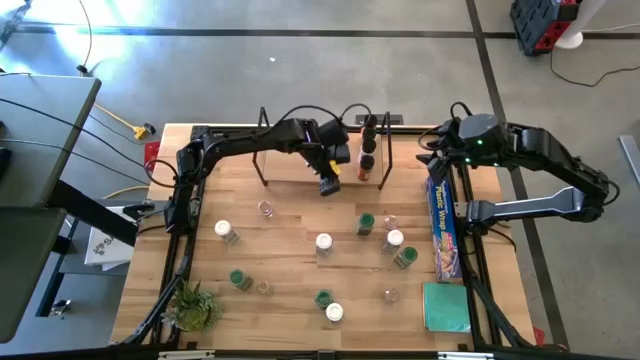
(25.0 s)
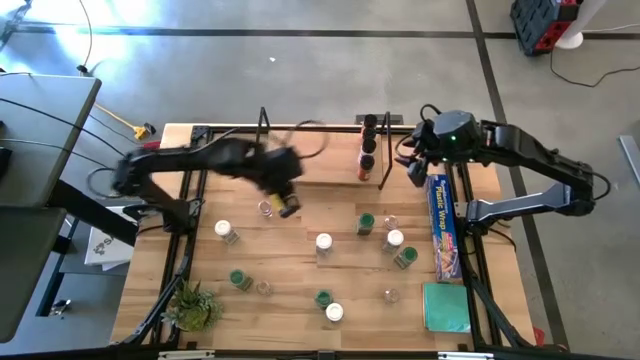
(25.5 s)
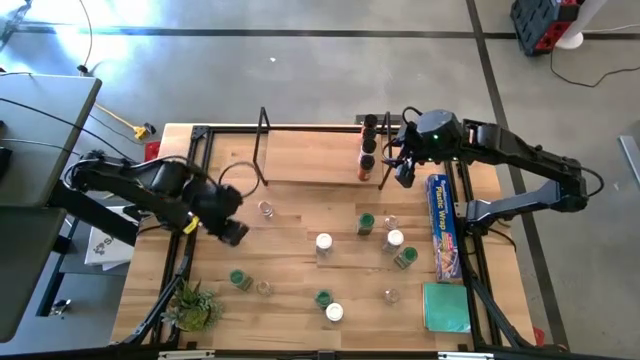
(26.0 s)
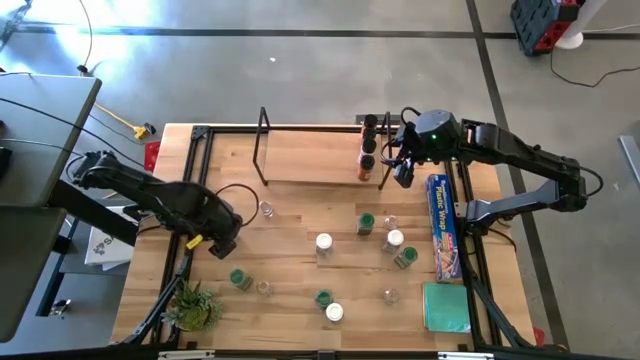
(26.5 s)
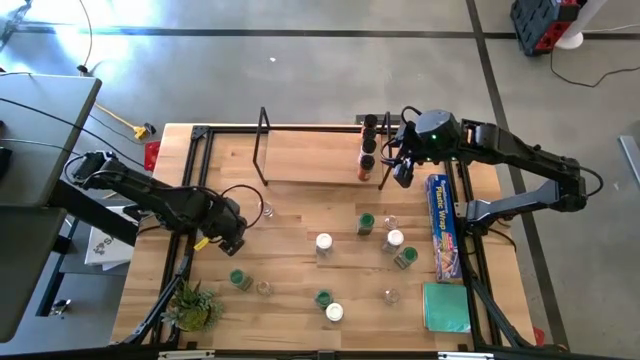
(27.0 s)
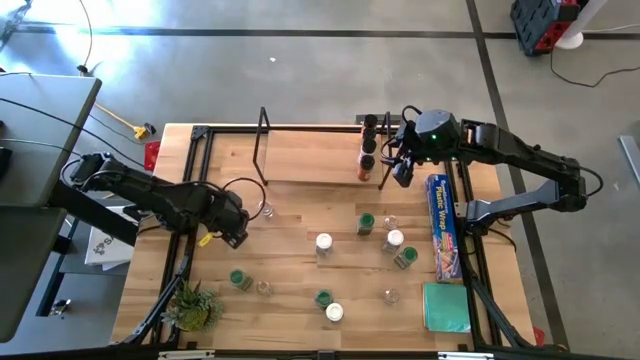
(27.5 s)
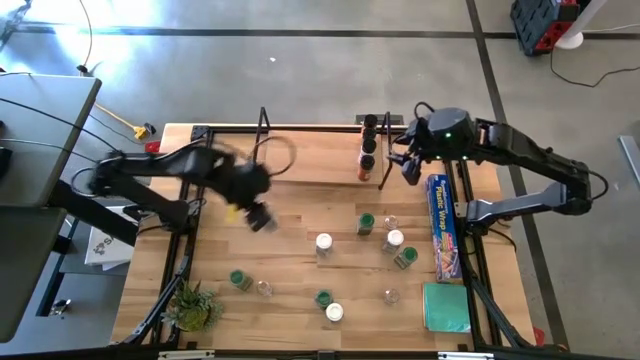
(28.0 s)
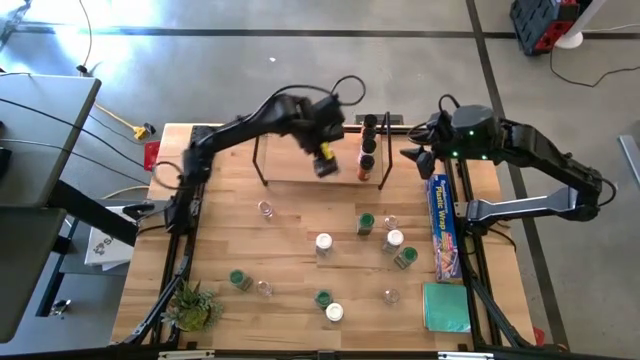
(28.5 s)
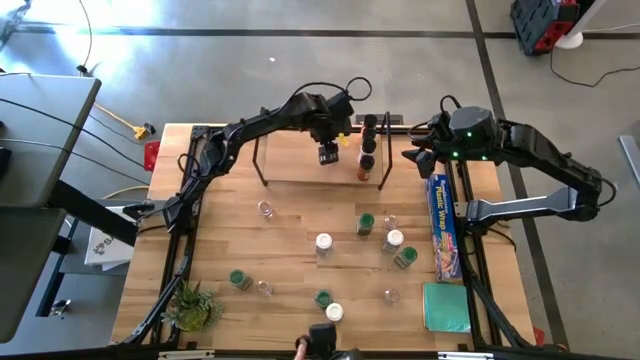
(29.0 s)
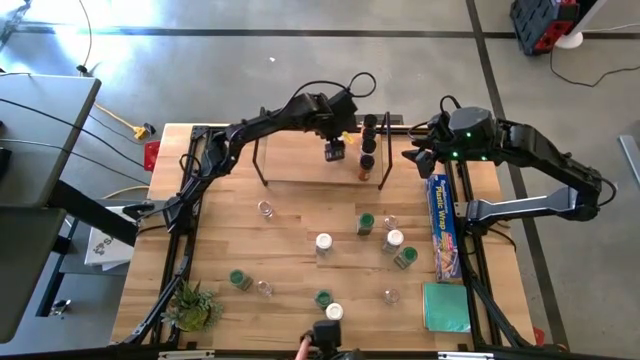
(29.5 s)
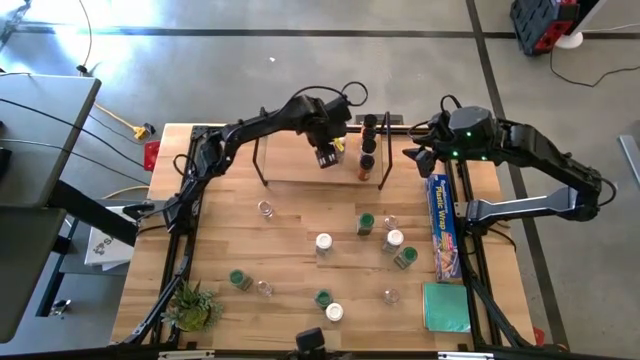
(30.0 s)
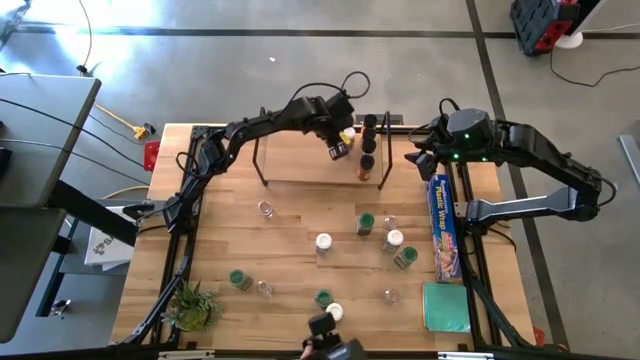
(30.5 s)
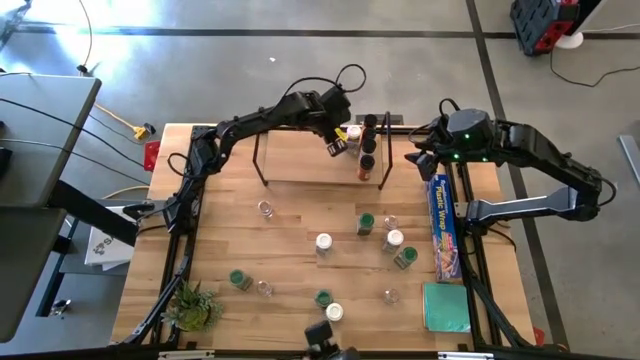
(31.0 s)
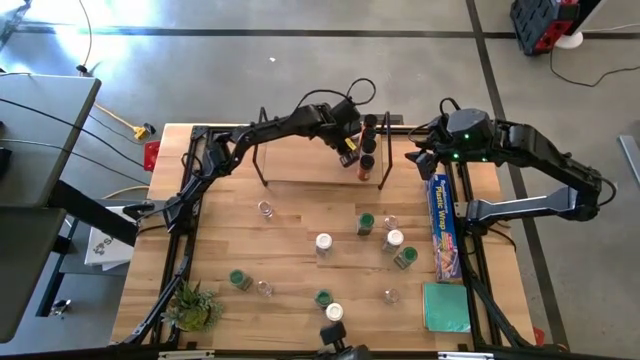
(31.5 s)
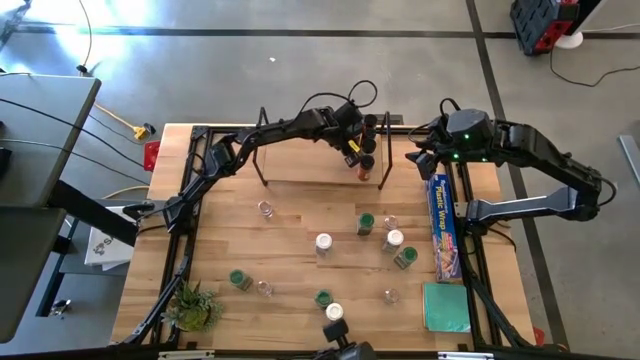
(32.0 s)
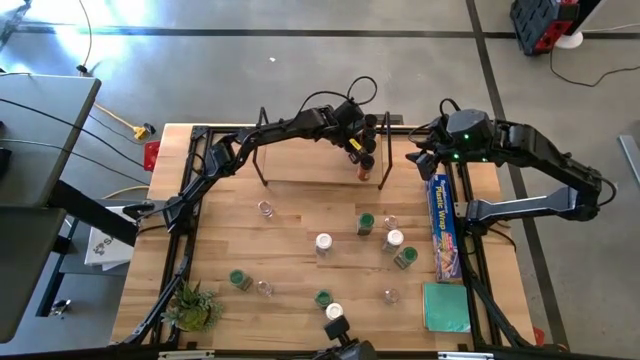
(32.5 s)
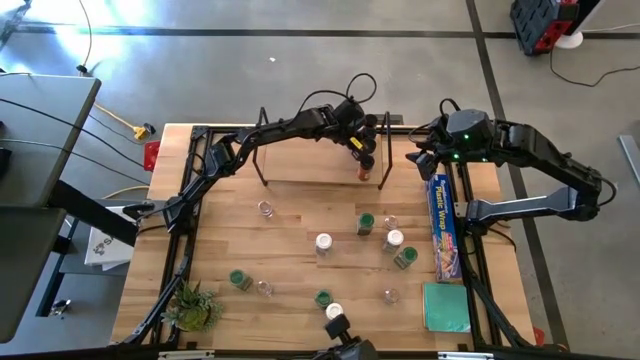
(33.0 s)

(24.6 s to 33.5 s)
Task: Shelf spices
Put the white seasoning bottle on the shelf

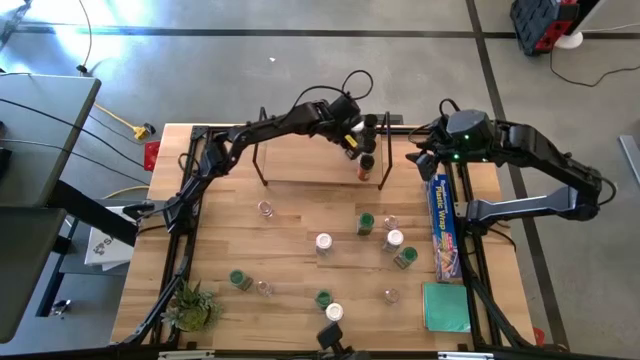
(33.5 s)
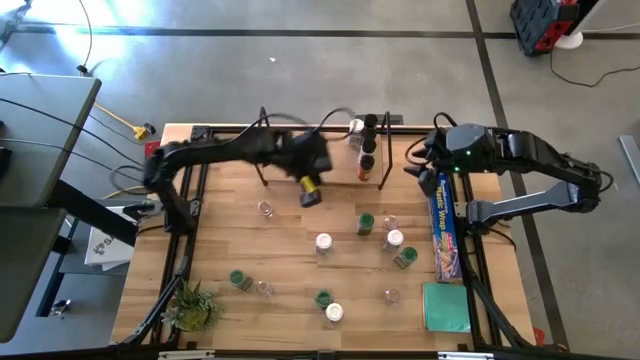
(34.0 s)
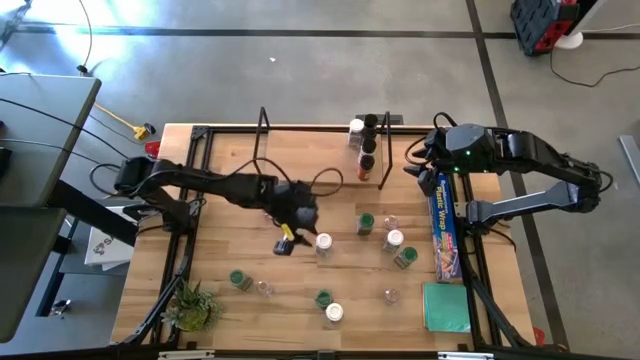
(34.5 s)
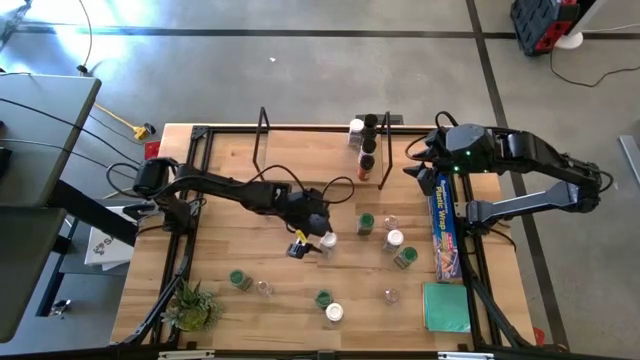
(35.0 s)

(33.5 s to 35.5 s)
Put the white seasoning bottle on the shelf aligned with the other white seasoning bottle

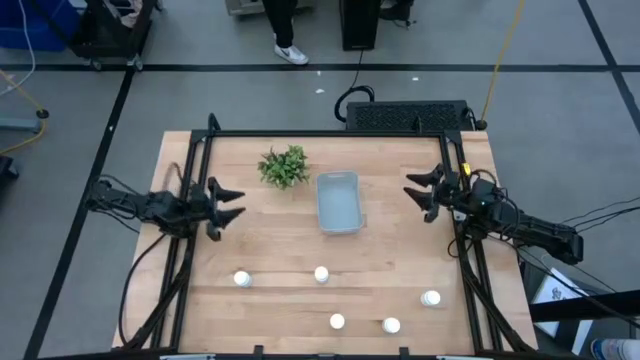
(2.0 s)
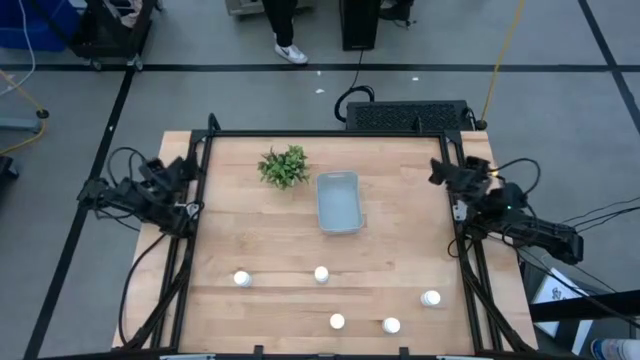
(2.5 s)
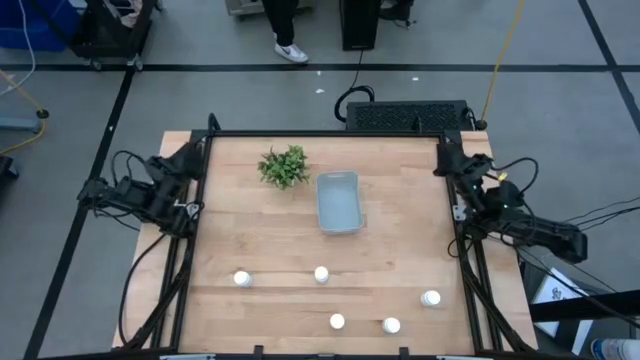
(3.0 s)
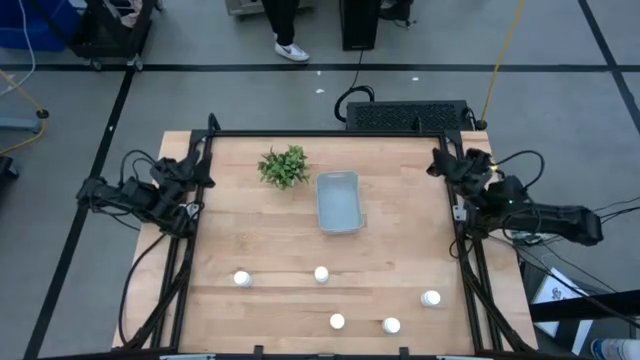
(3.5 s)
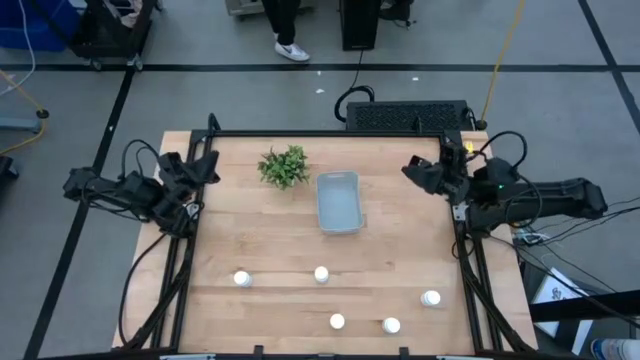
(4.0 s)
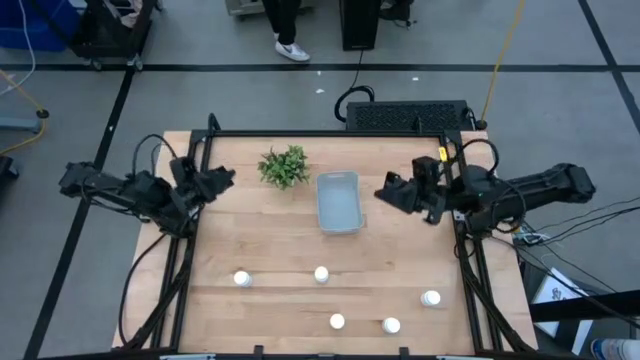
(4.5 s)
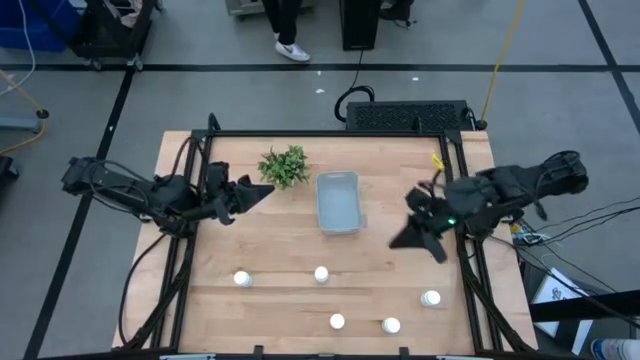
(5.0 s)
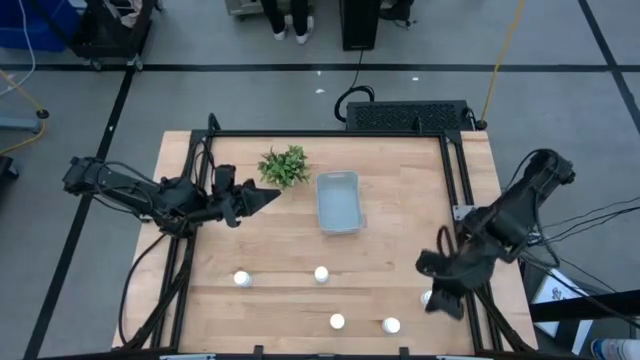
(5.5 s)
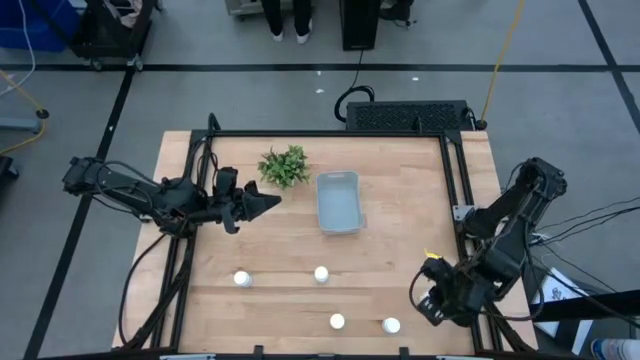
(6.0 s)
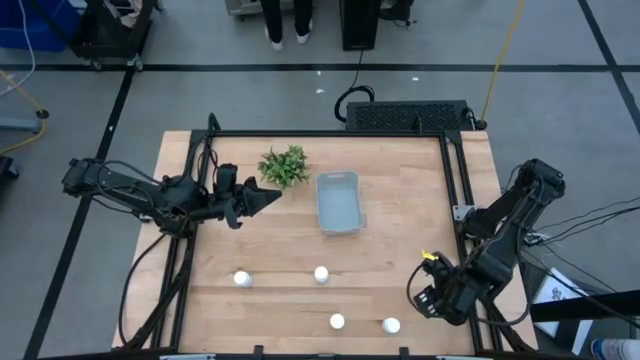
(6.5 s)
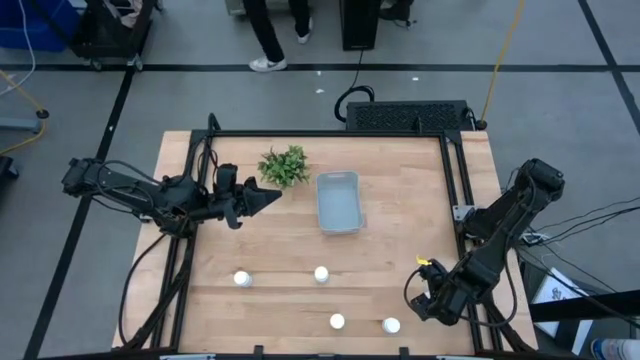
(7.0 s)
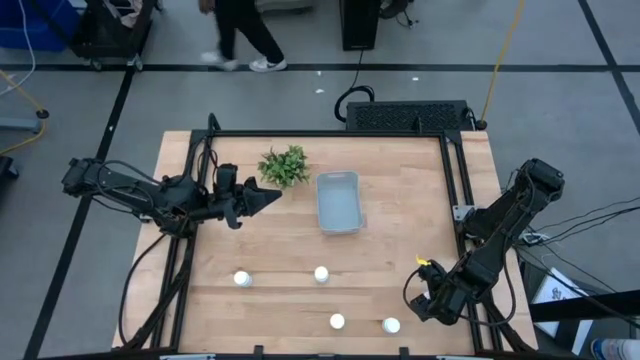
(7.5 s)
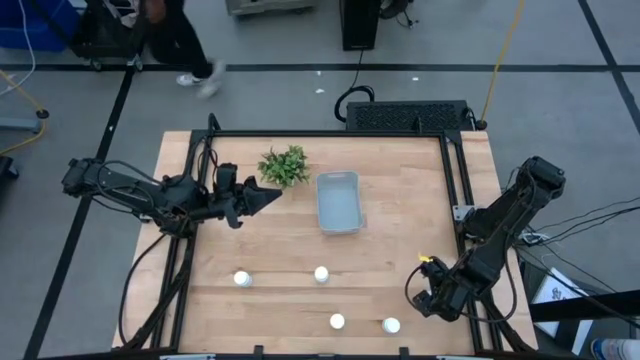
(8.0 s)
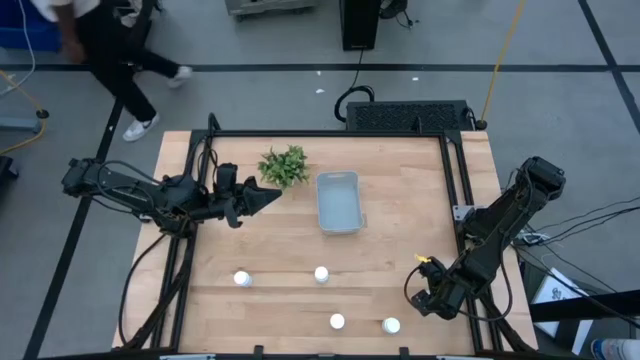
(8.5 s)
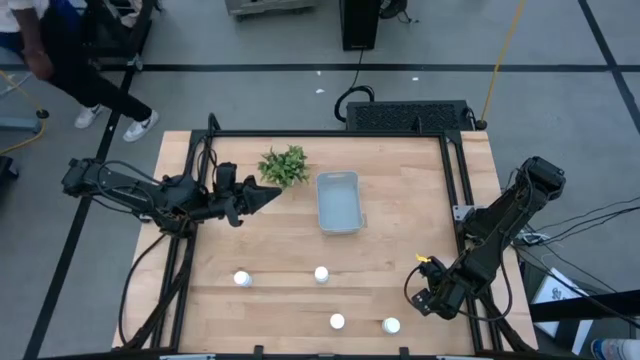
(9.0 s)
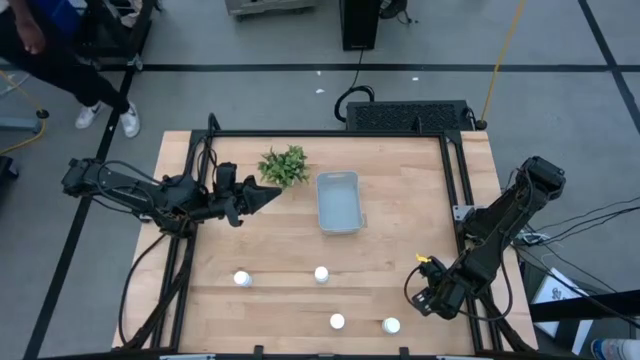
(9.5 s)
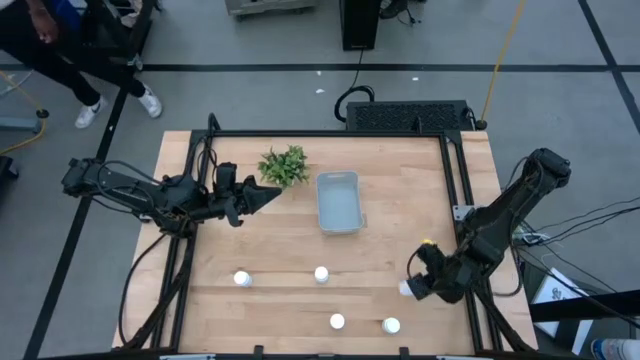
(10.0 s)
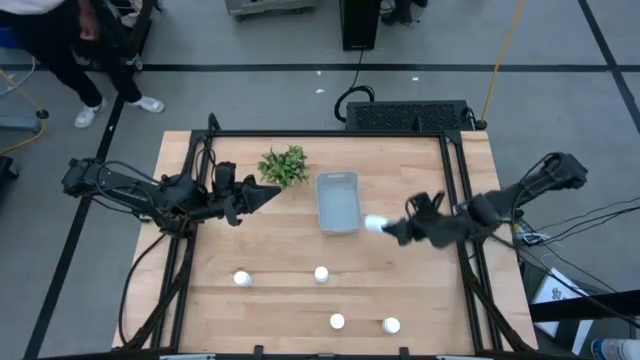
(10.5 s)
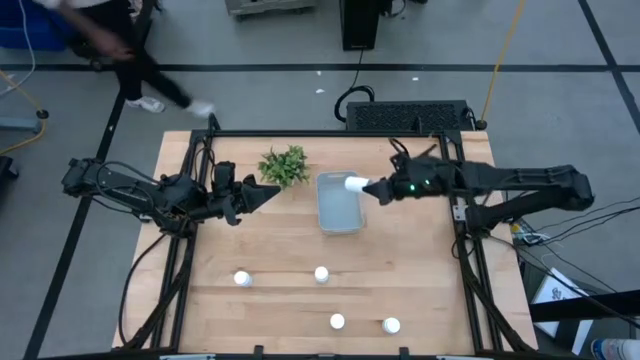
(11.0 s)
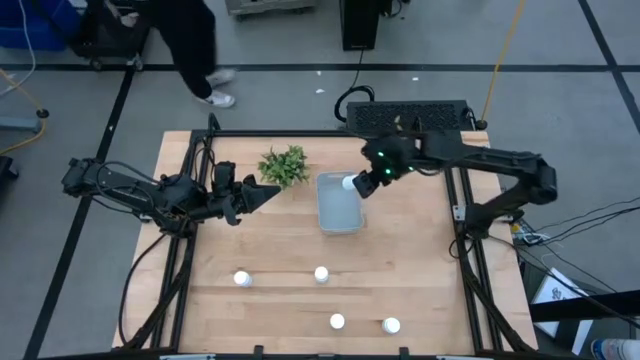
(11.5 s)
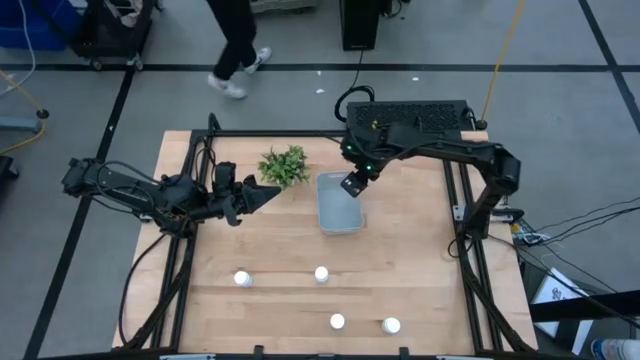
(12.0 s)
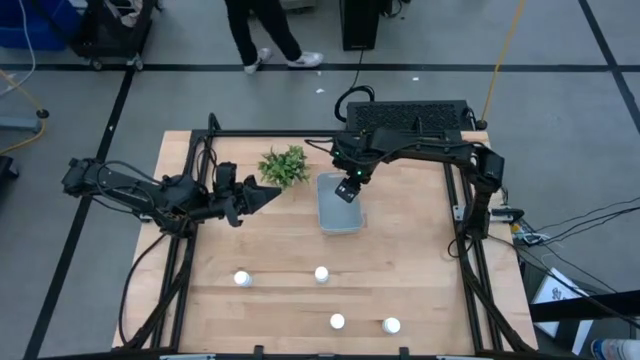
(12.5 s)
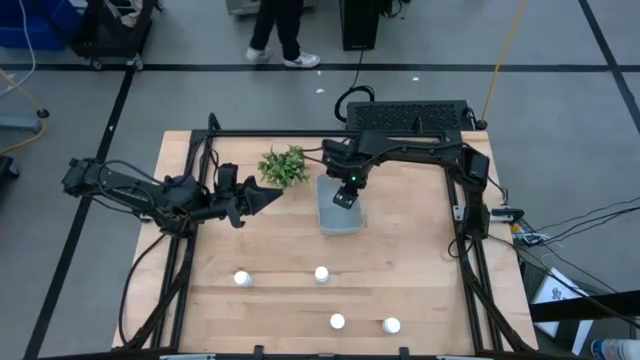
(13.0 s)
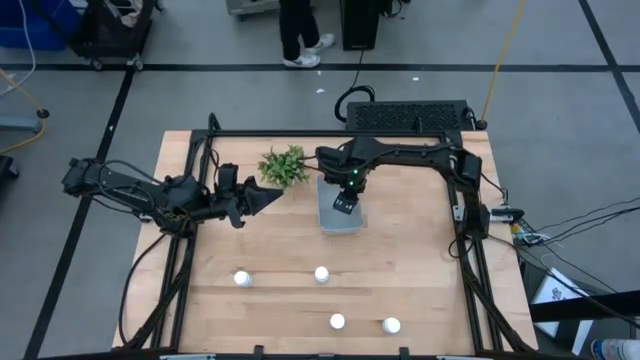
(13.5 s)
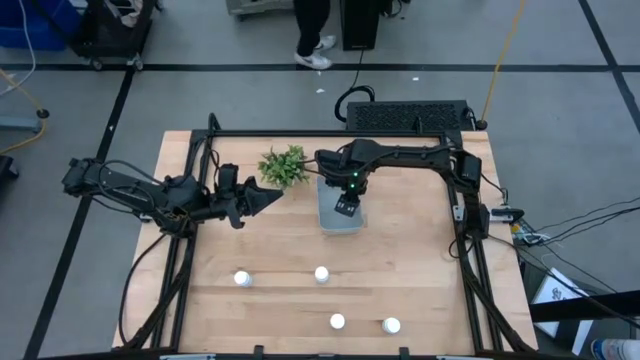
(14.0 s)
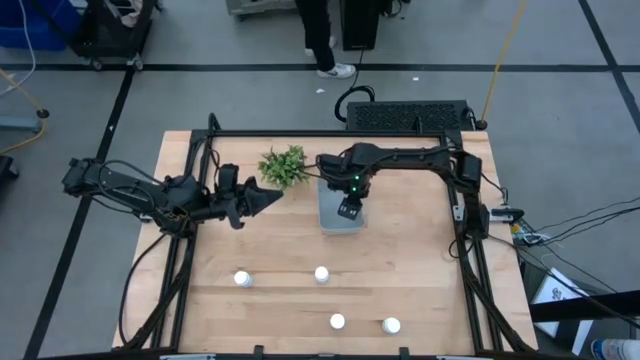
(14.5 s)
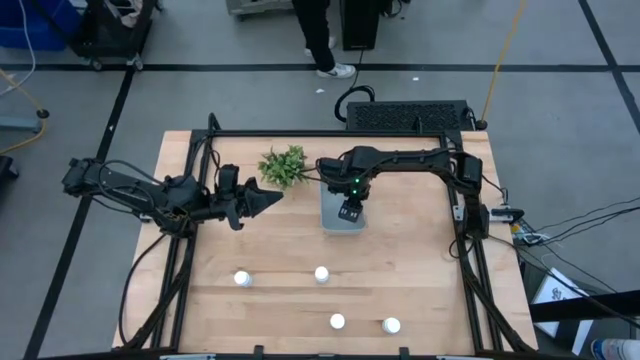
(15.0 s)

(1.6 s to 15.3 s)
Task: Pick and place pill bottles into a basket
Put the white pill bottle into the gray bin
